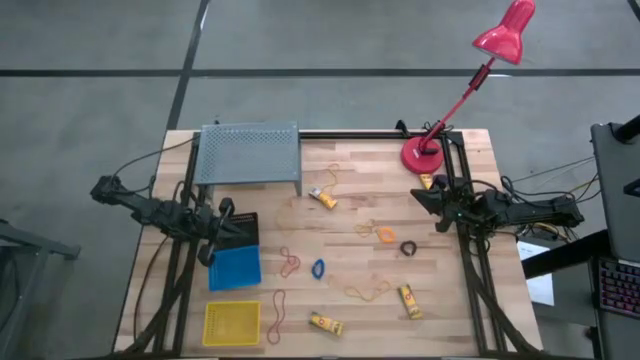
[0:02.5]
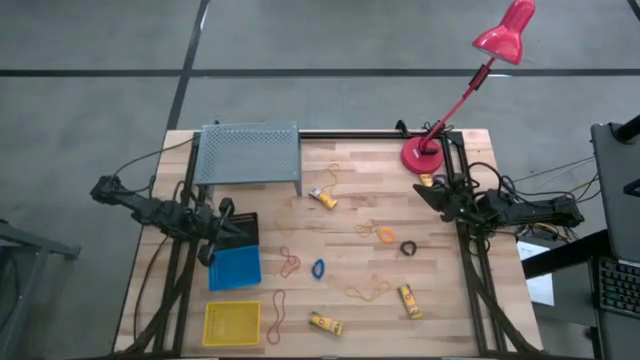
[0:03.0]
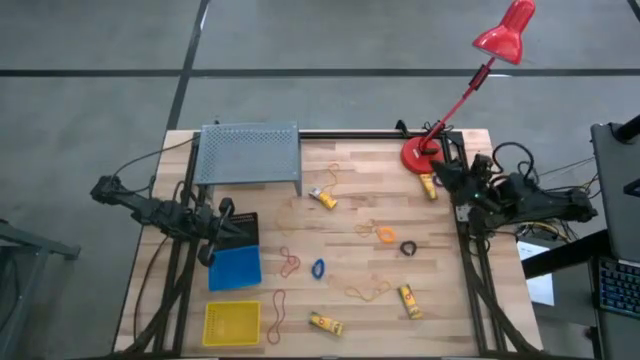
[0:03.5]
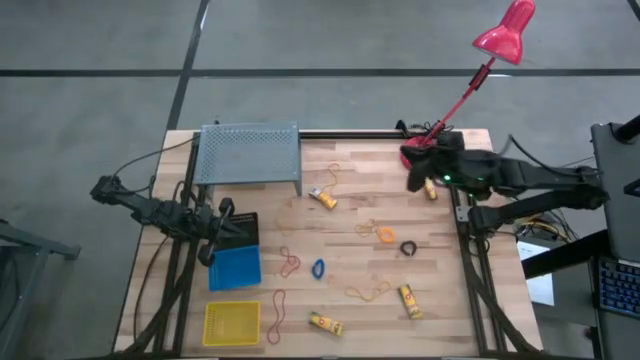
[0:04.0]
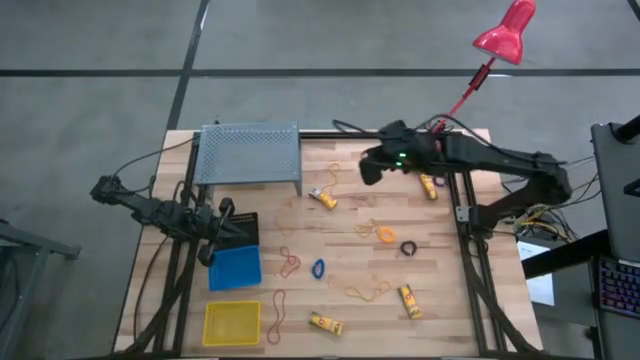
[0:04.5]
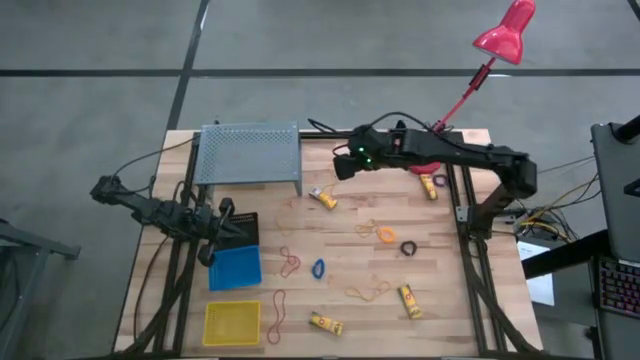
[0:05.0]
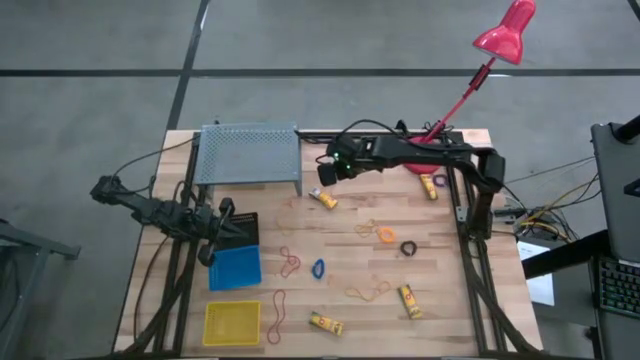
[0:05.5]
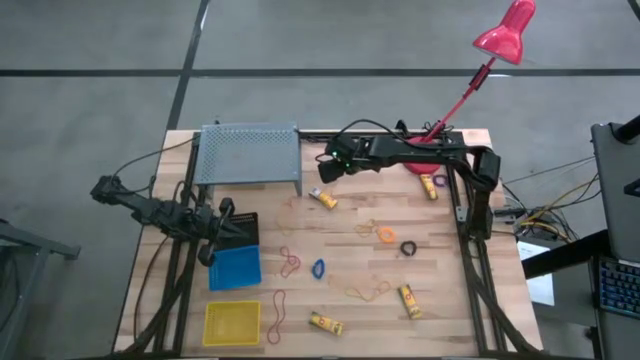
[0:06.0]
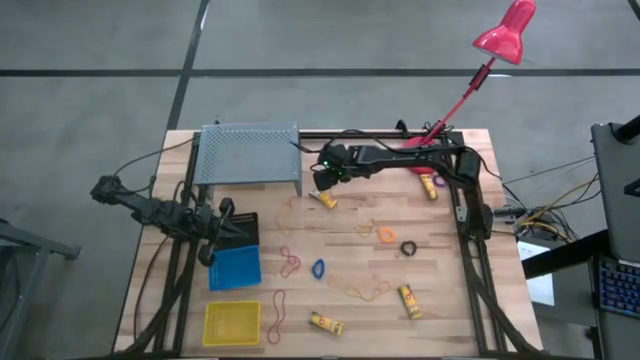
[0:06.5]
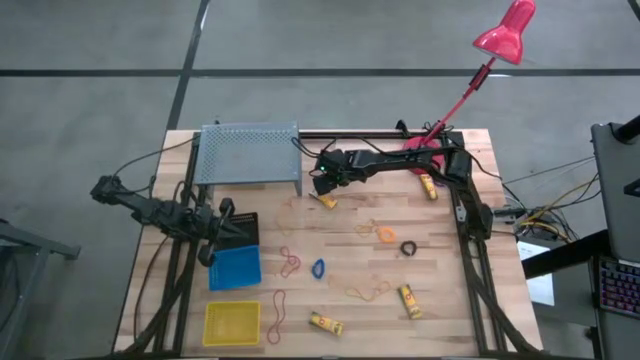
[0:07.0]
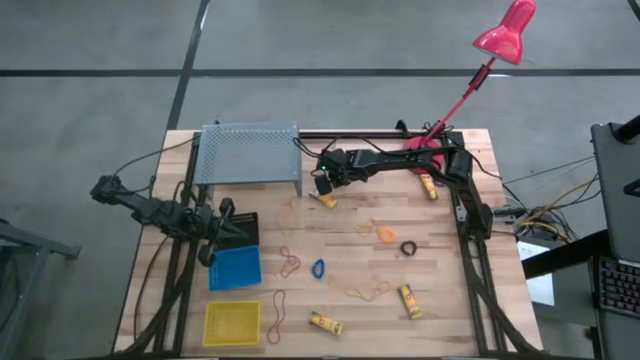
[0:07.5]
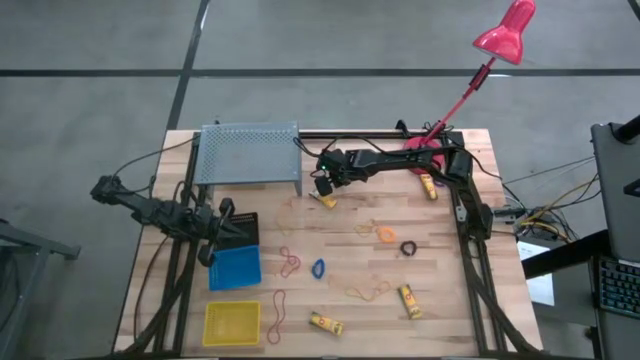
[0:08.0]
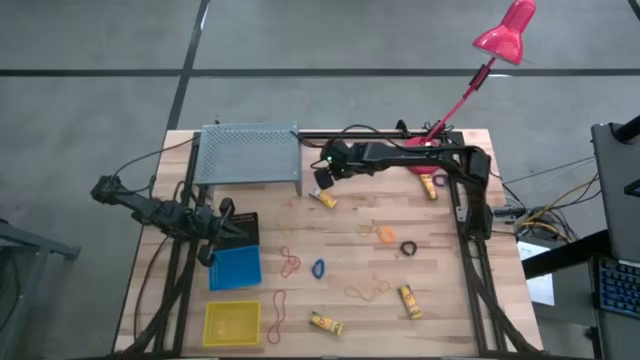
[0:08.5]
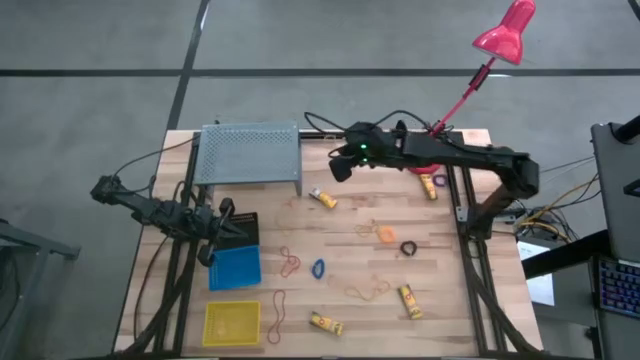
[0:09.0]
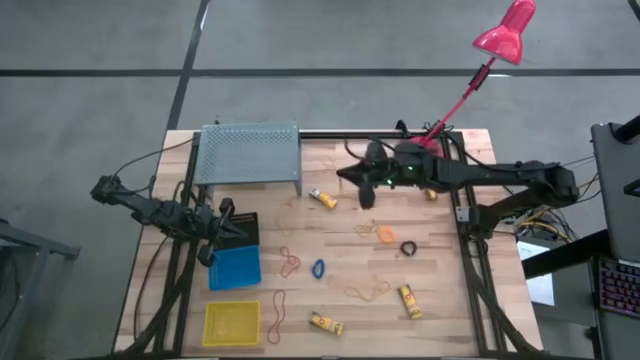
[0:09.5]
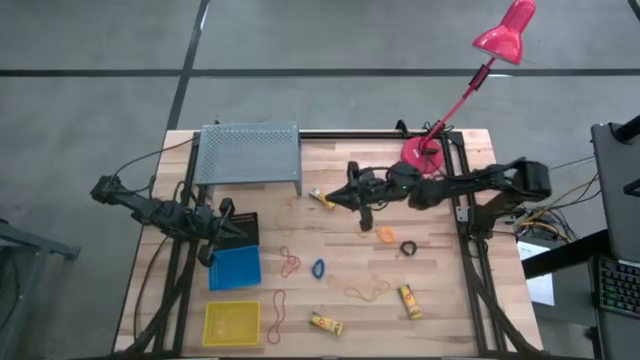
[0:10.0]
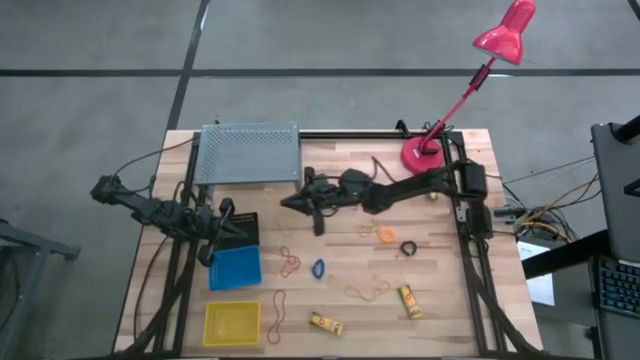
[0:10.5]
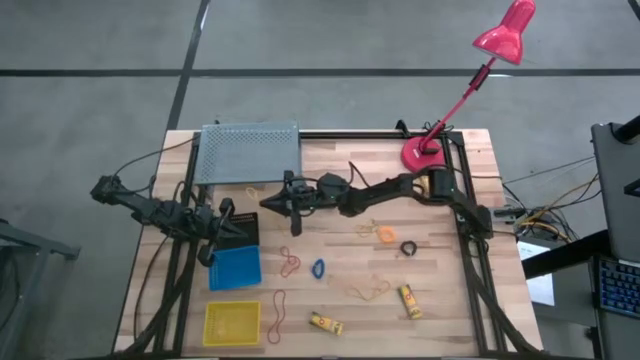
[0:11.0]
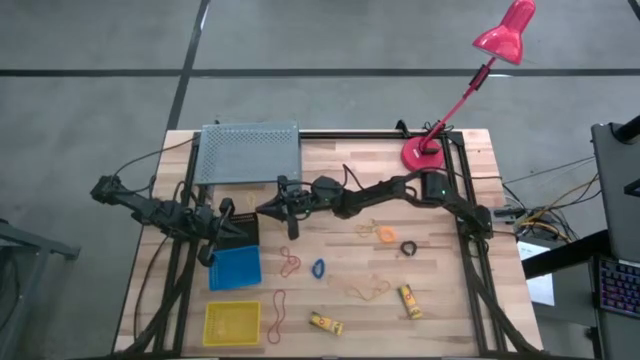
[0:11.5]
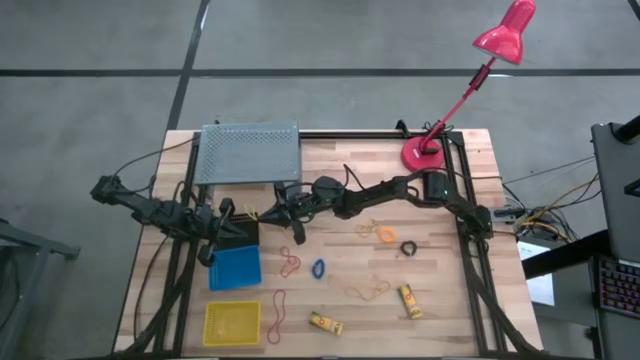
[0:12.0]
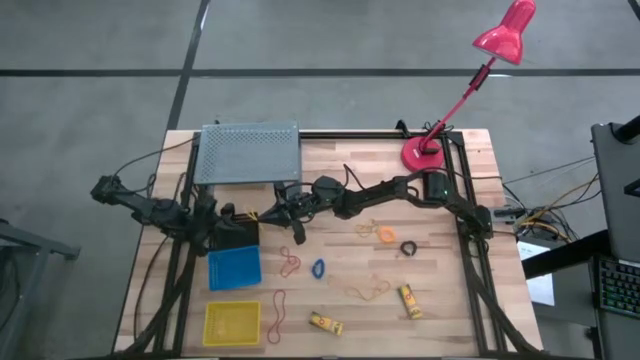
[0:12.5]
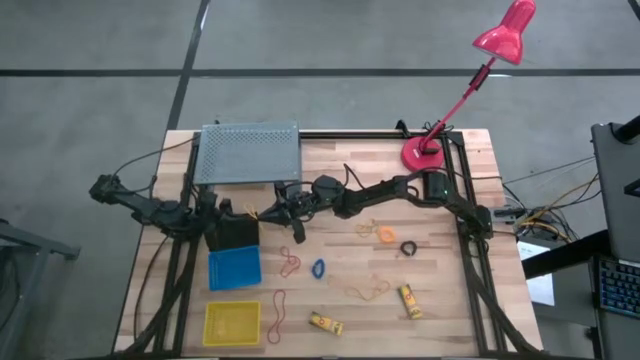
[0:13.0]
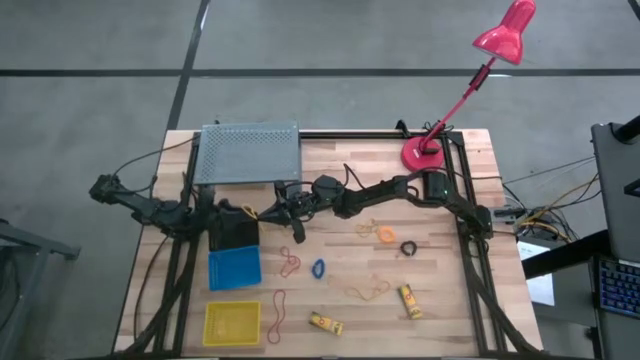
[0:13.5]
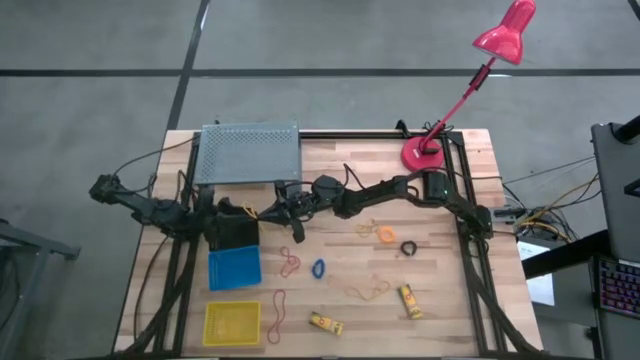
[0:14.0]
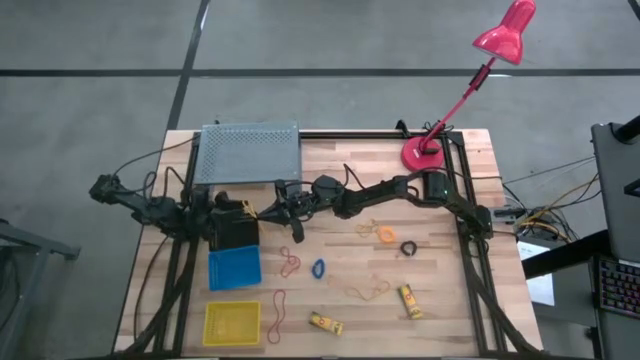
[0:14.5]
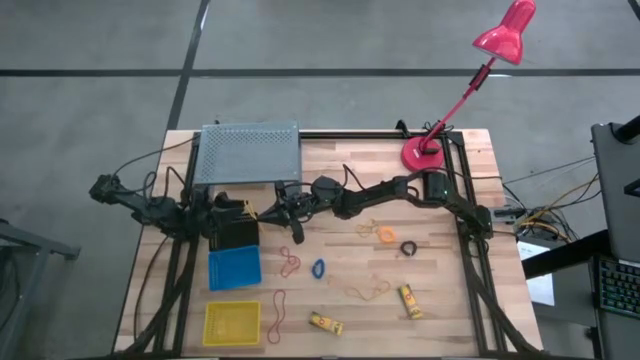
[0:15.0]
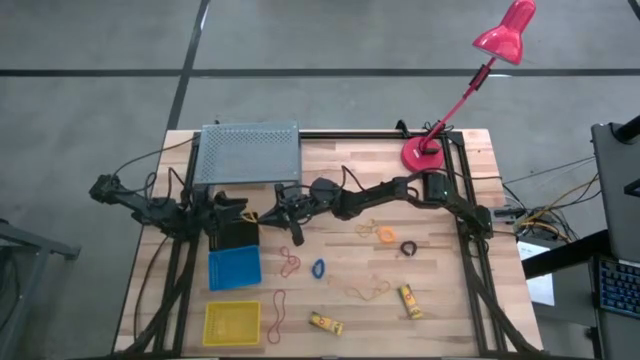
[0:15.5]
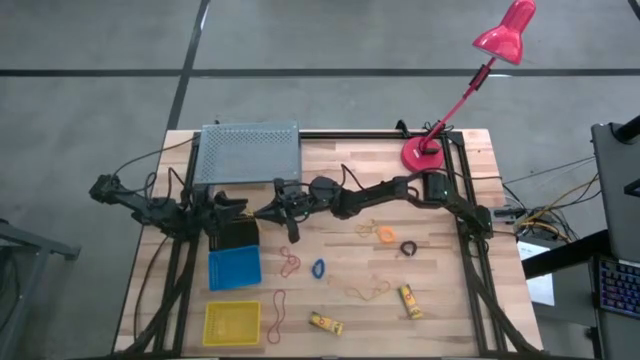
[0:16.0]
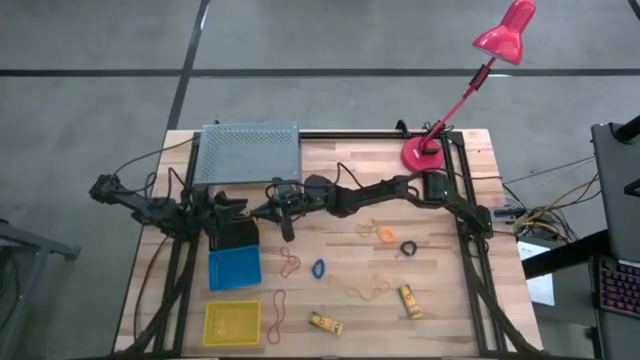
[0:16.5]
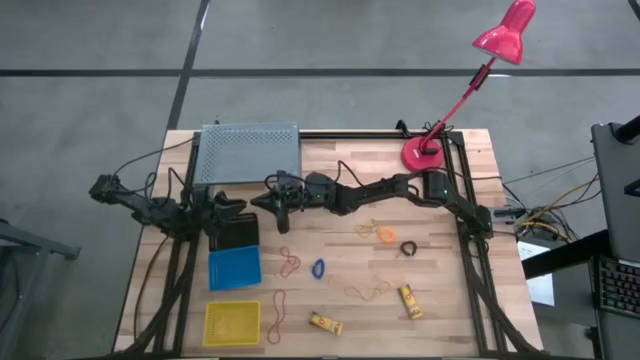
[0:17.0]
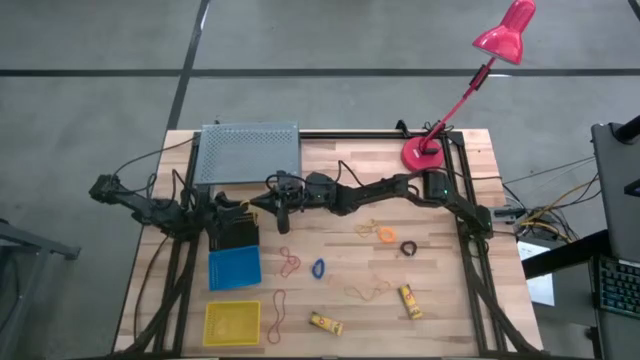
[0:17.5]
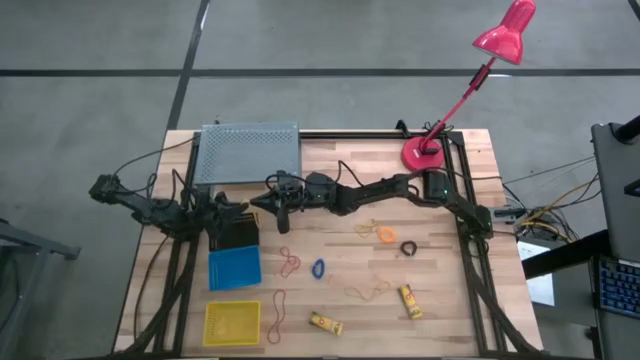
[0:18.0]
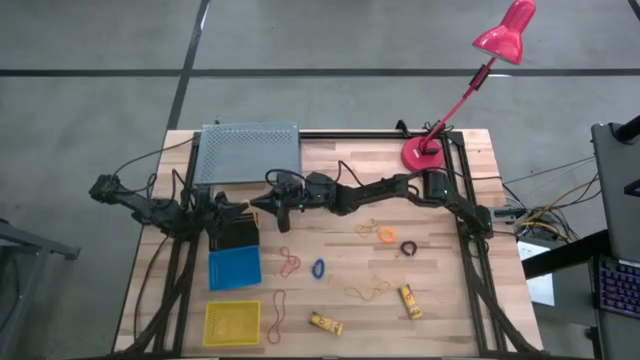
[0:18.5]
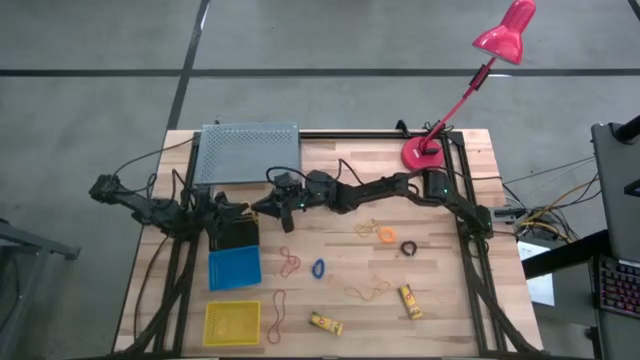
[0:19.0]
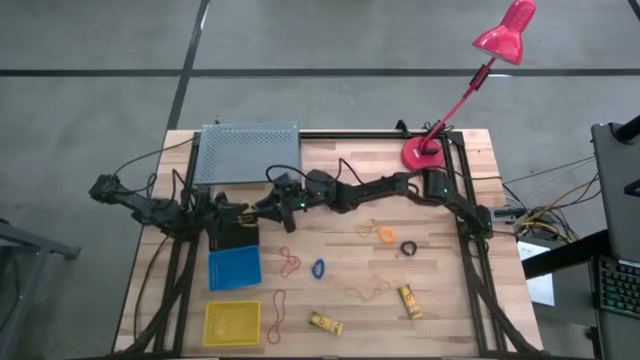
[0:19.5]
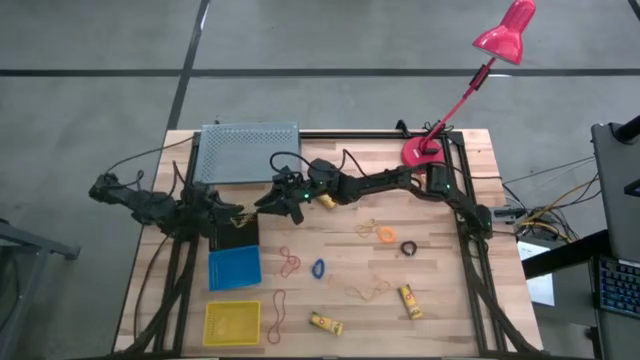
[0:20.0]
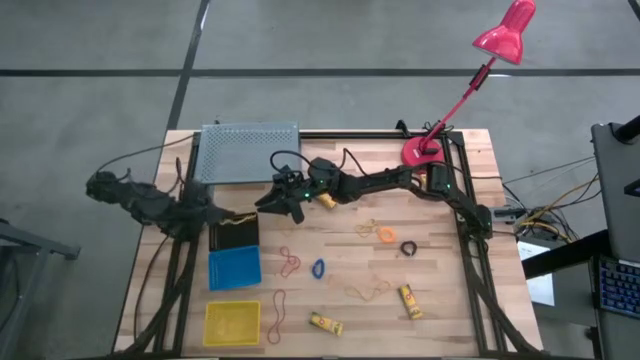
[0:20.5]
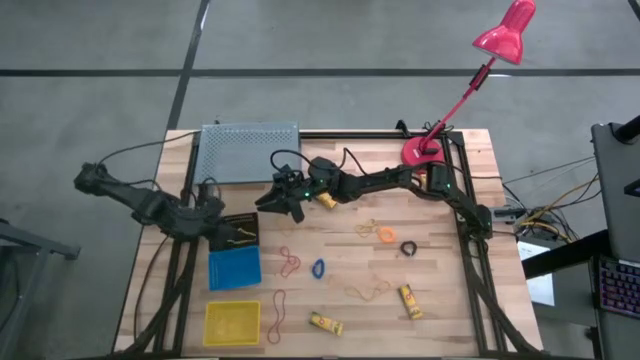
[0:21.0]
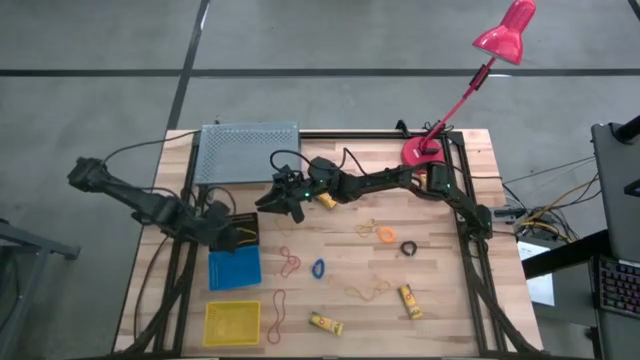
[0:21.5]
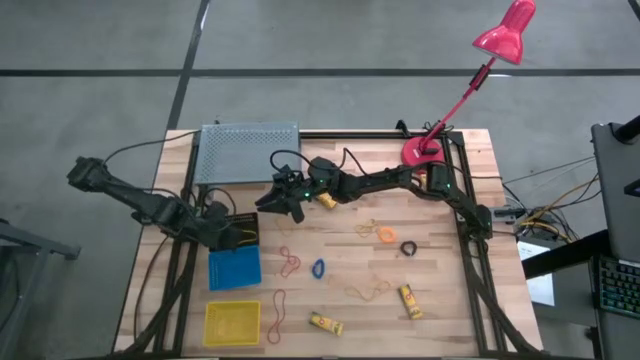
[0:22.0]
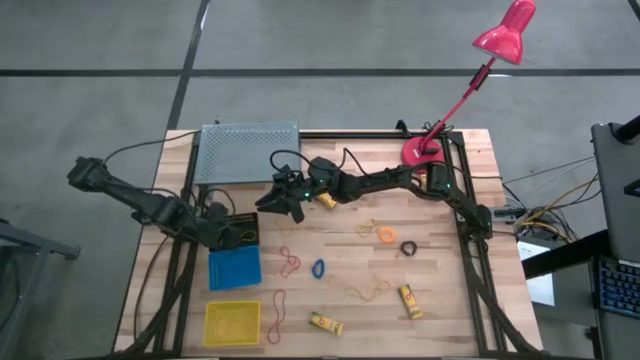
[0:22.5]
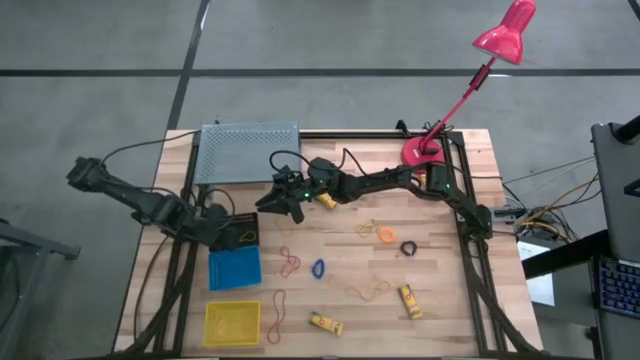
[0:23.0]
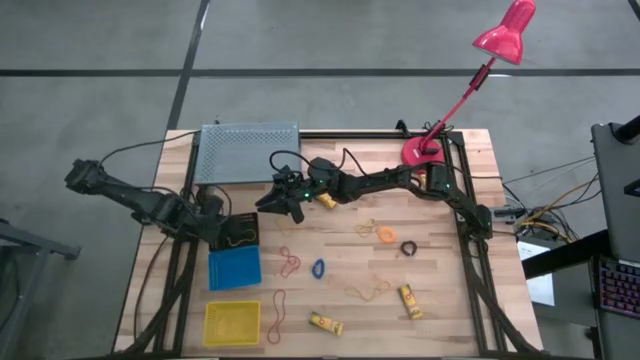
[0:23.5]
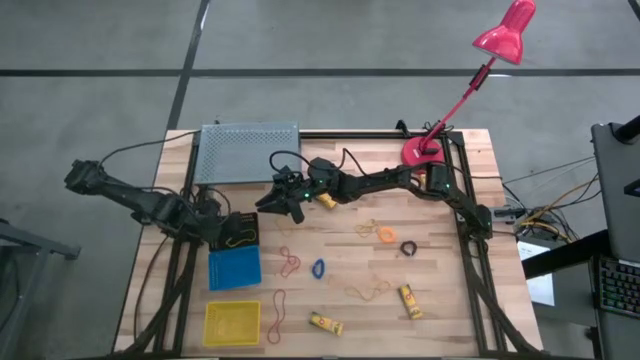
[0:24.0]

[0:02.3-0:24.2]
Task: Pick & Place Office Desk Supplies
Put the yellow rubber band in the black bin
